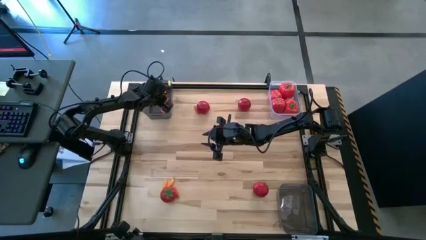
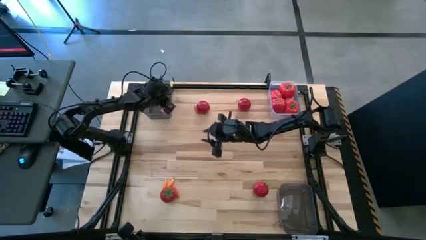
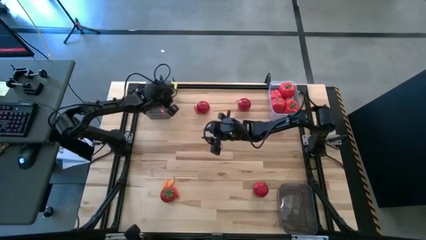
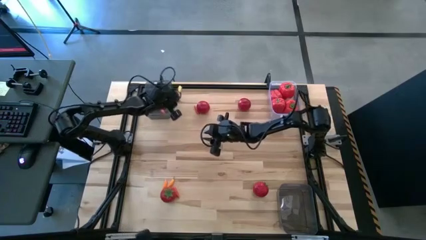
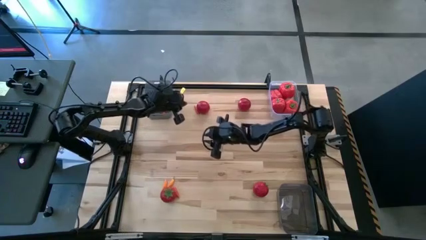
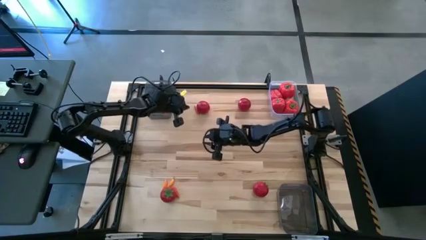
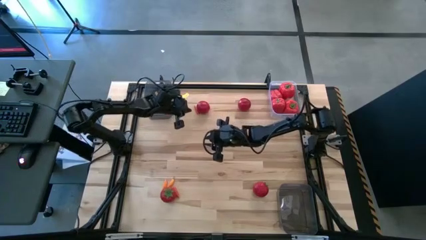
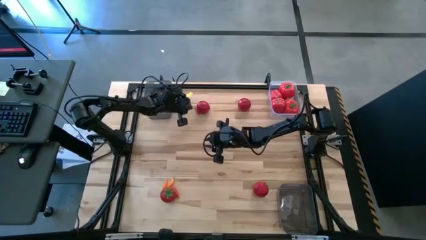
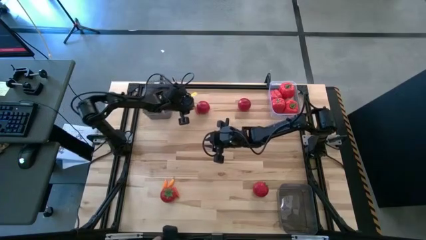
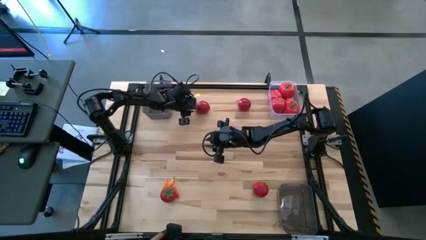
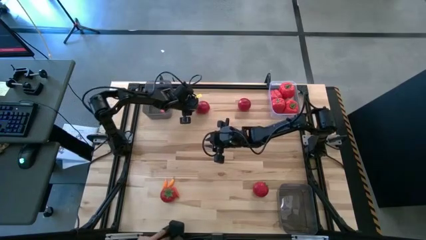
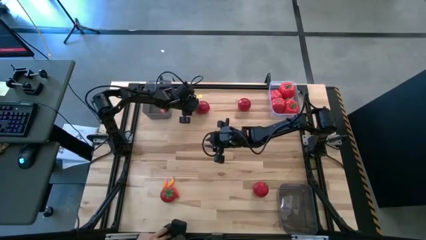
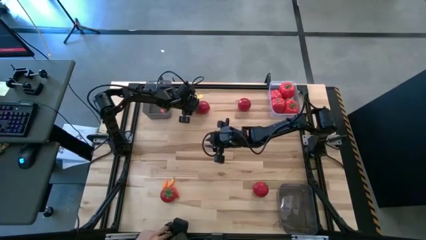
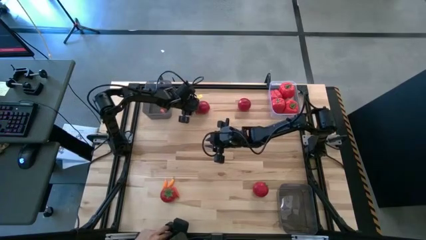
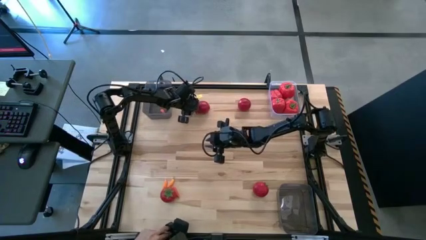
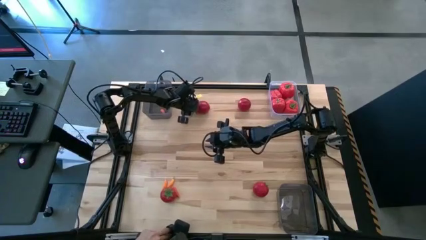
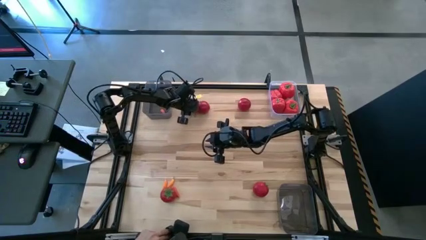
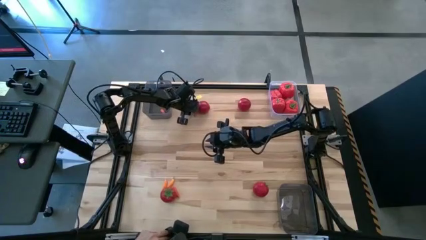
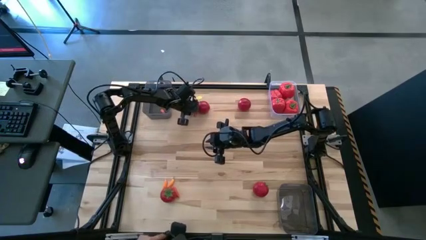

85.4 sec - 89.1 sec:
Task: Sort produce into baskets
Put the orange chili pepper into the top black bin

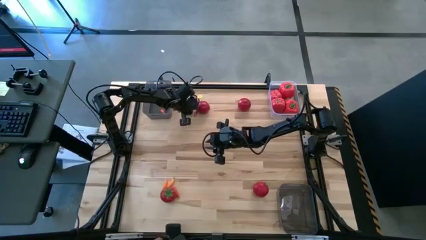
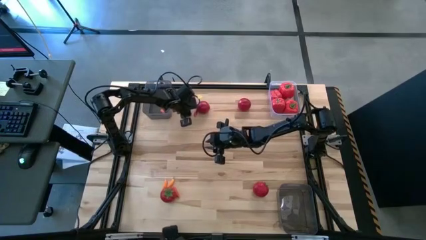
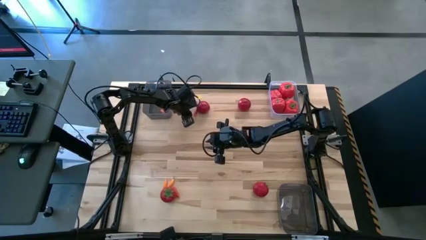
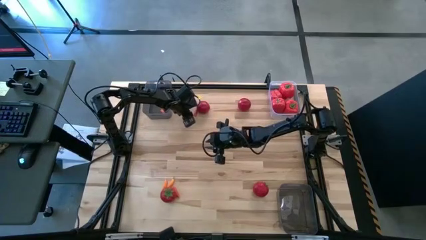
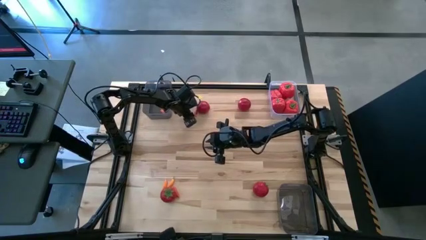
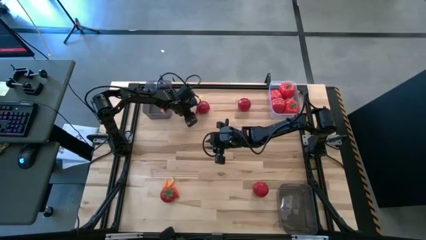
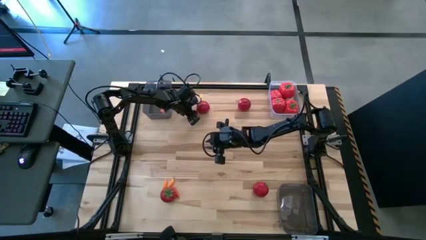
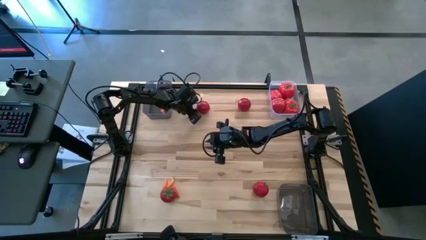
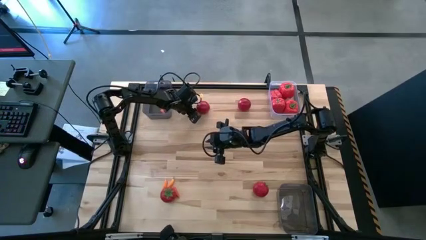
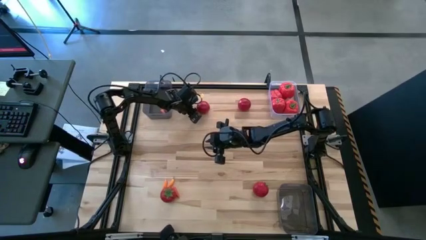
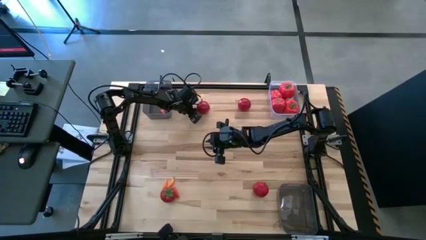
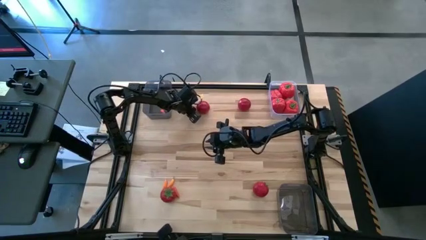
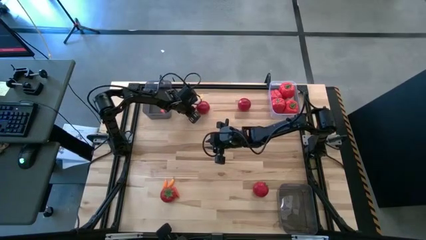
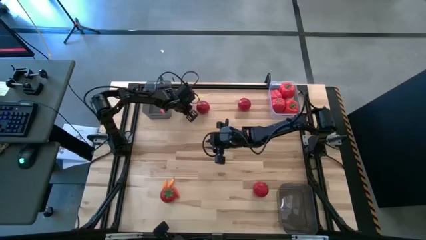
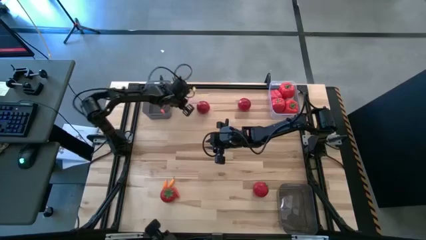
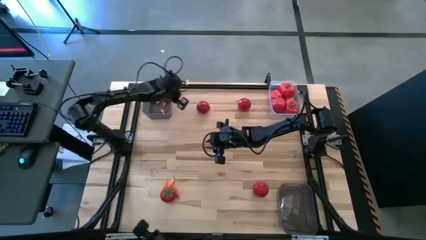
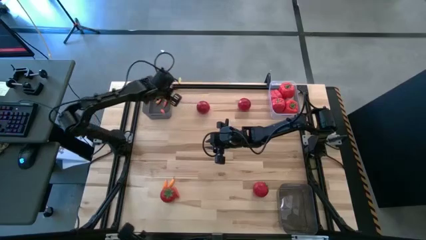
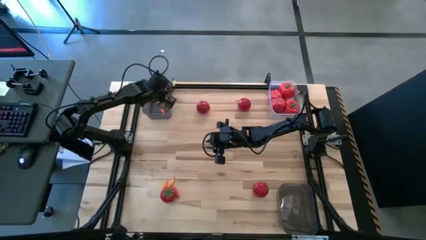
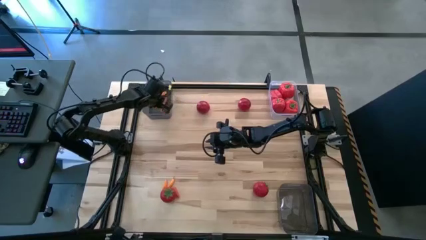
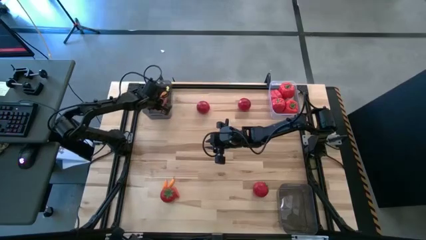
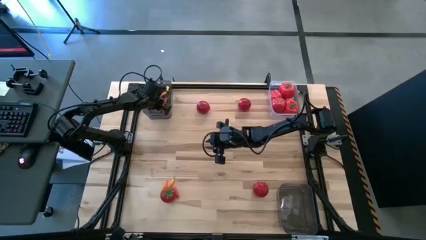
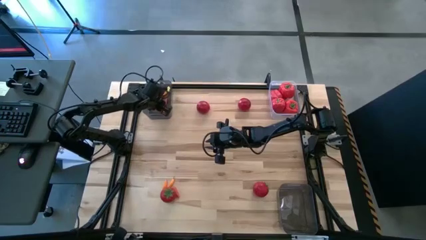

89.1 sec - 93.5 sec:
Put the orange chili pepper into the top black bin

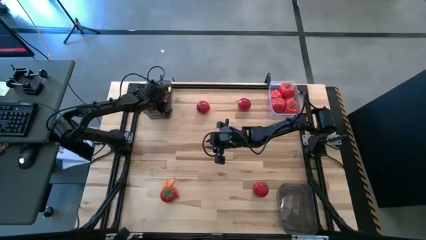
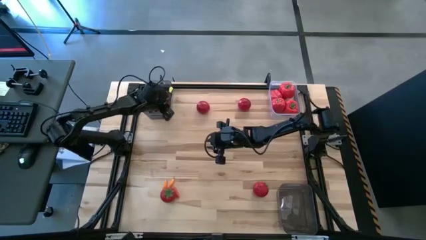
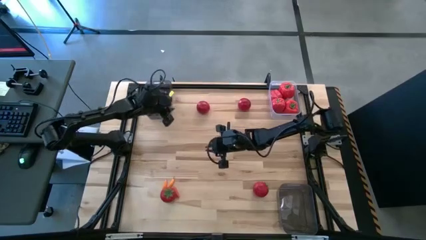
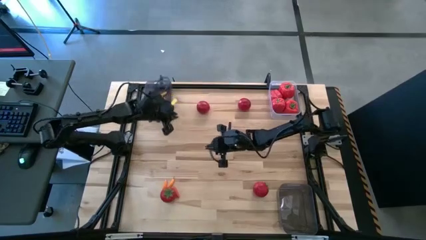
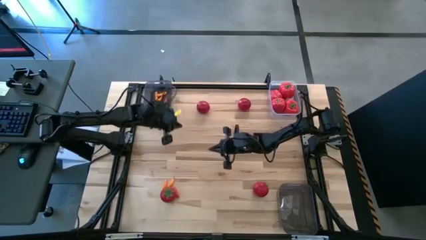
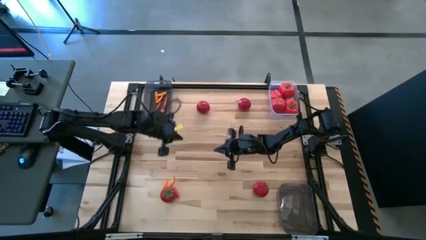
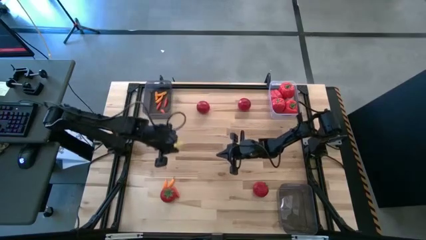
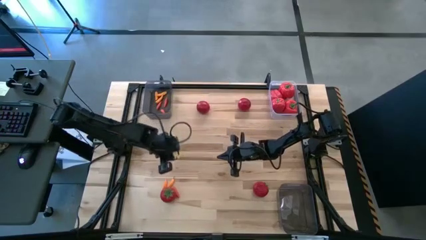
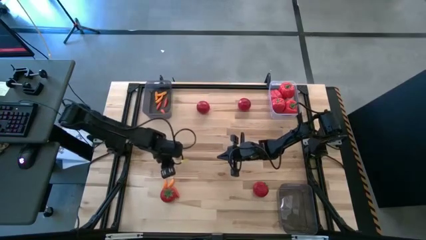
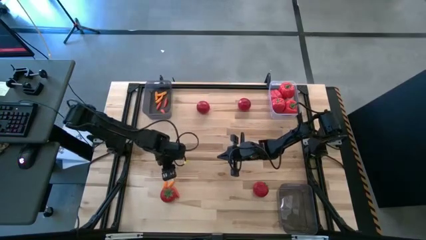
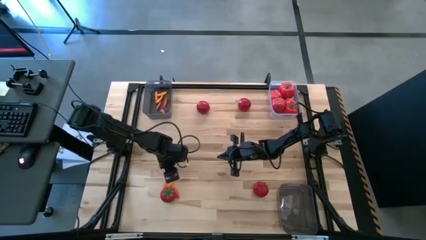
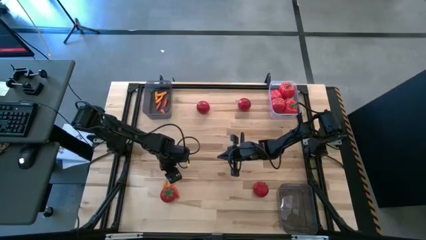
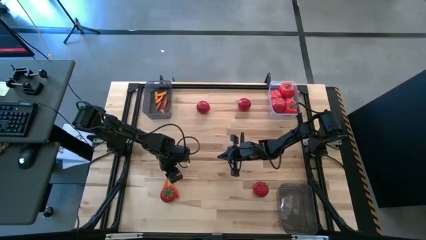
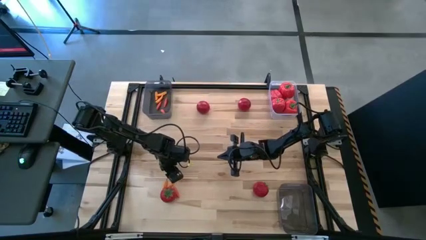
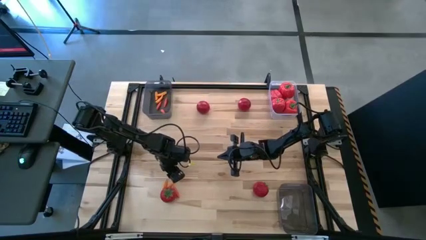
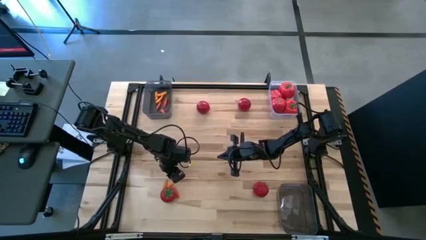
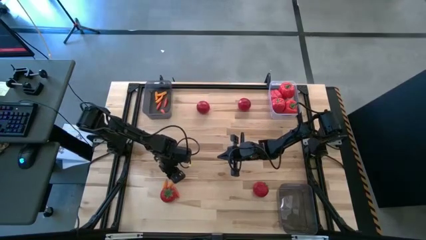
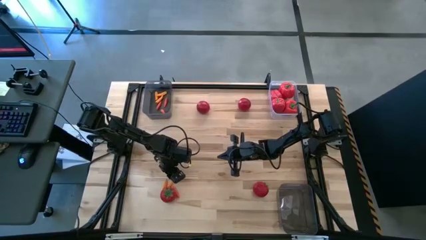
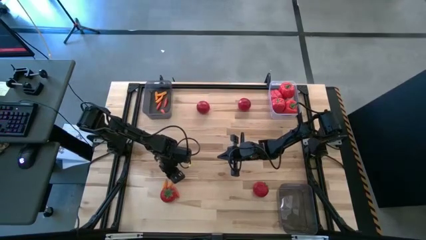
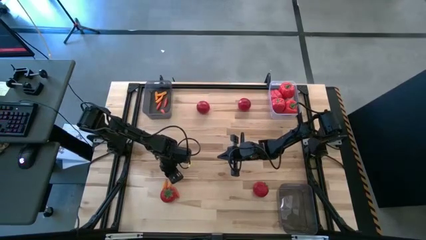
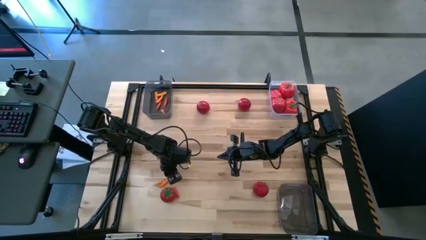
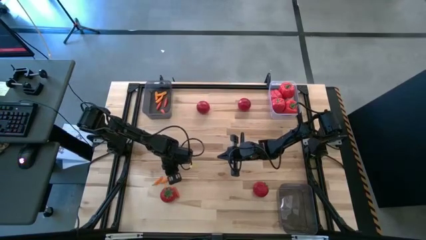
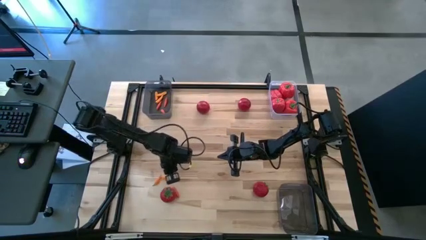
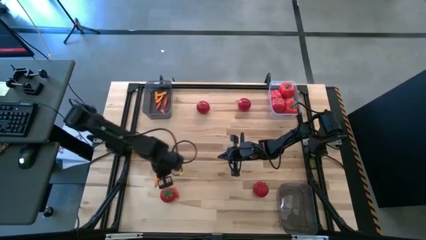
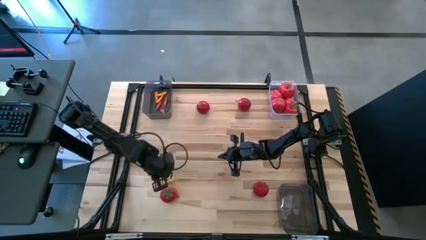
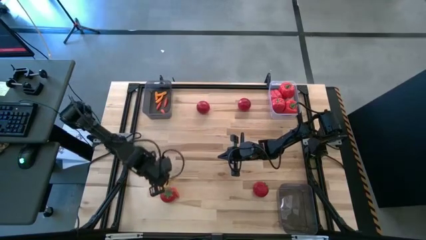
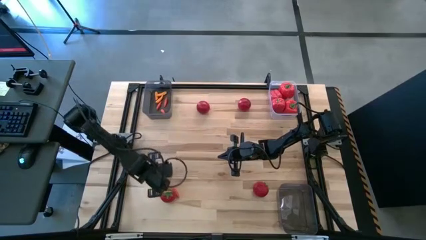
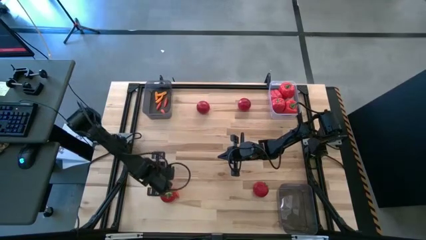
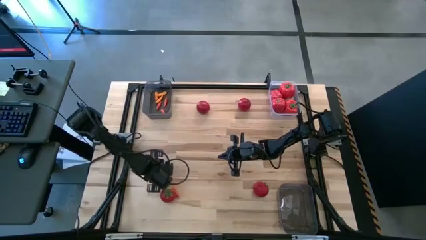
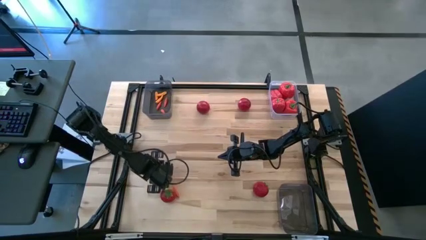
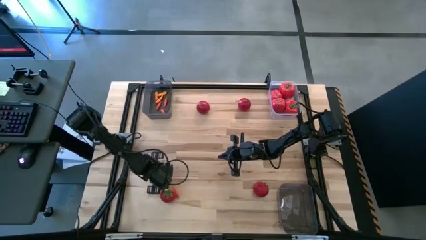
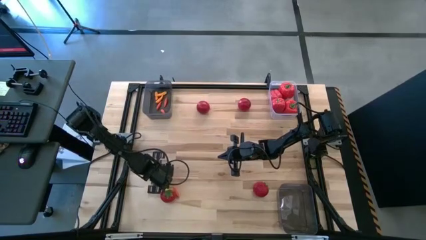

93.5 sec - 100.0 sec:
Put the yellow chili pepper into the top black bin

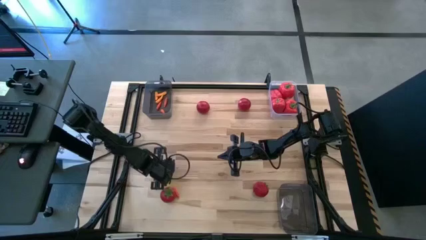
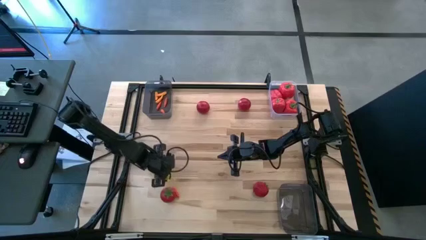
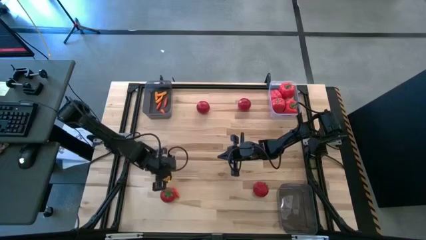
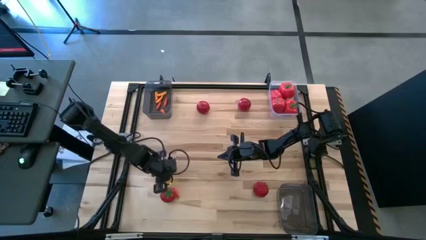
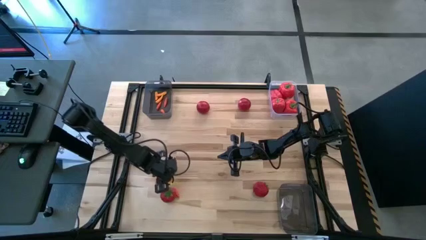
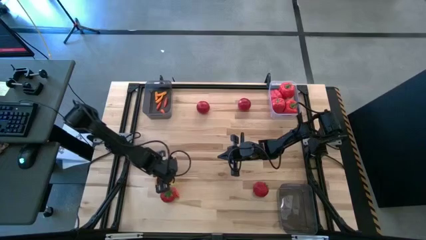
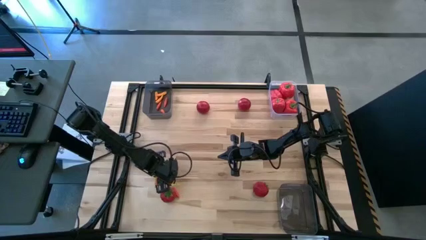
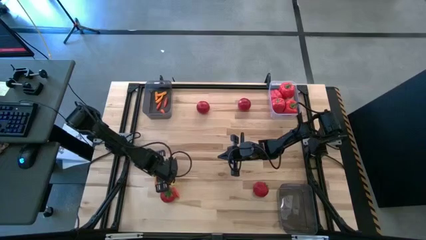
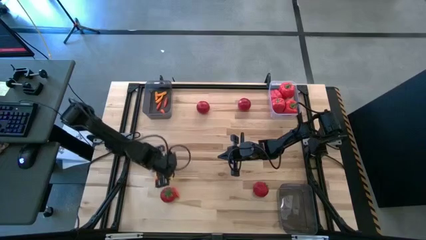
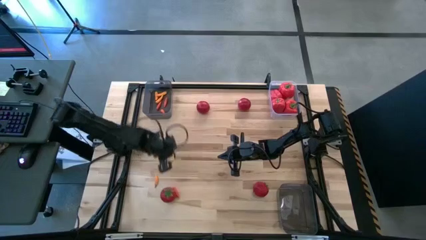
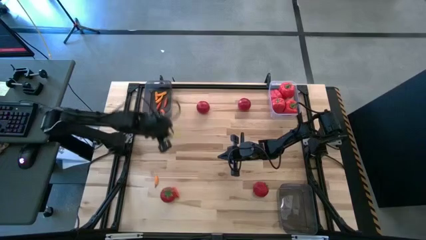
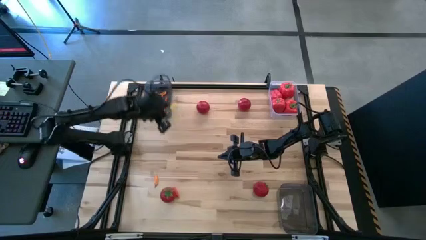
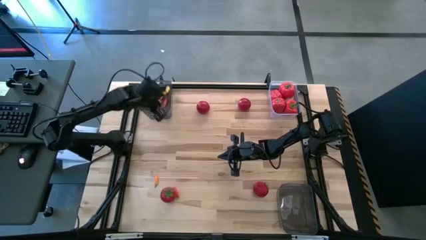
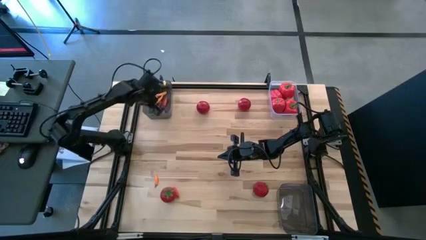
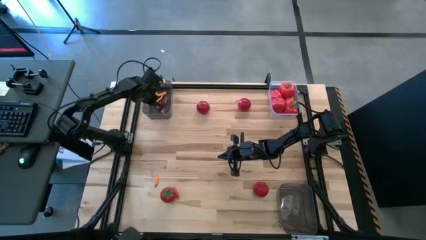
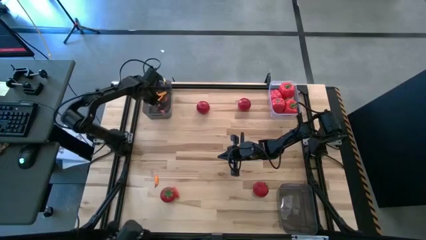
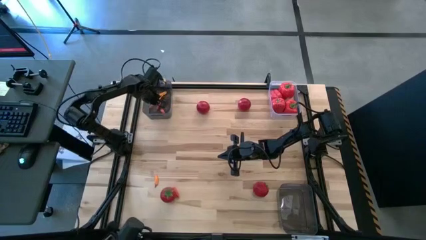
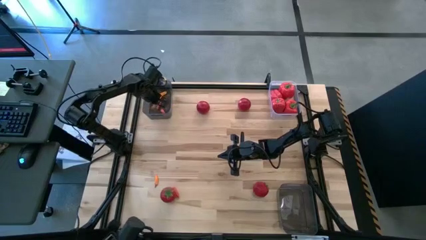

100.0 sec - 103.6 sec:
Put the yellow chili pepper into the top black bin
